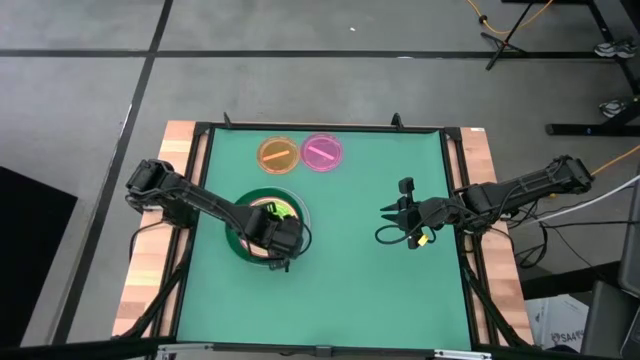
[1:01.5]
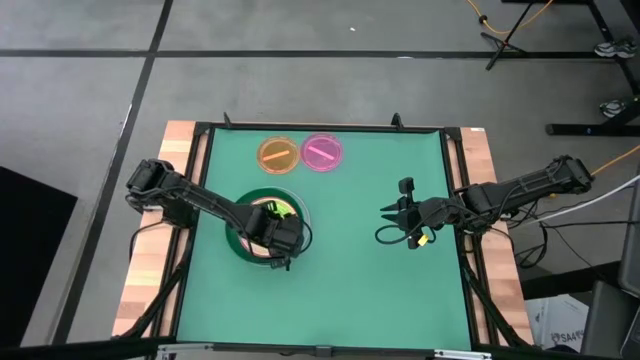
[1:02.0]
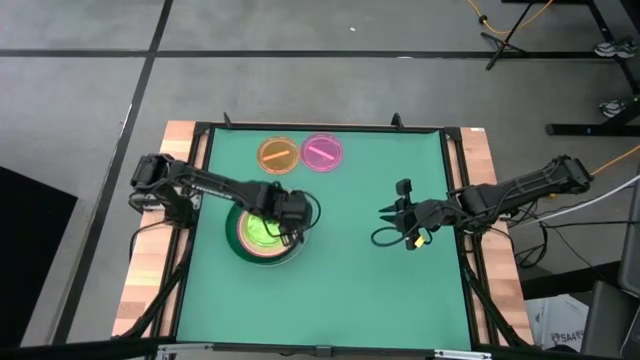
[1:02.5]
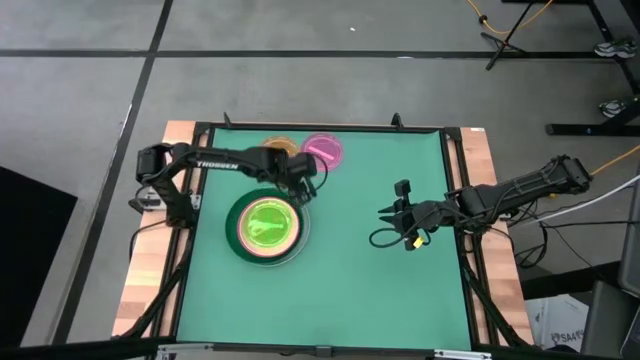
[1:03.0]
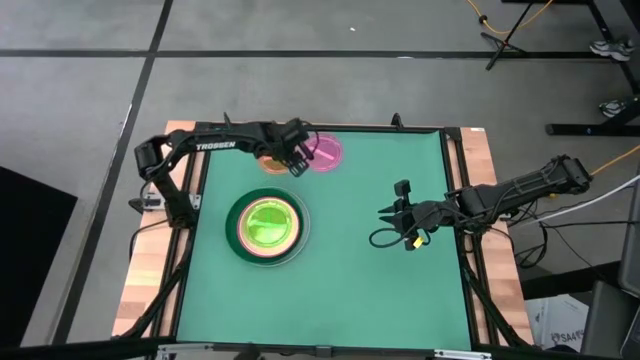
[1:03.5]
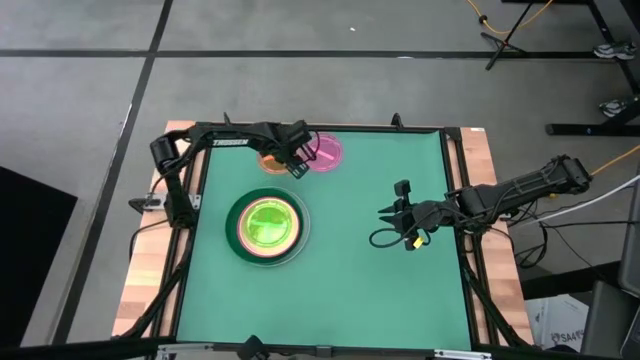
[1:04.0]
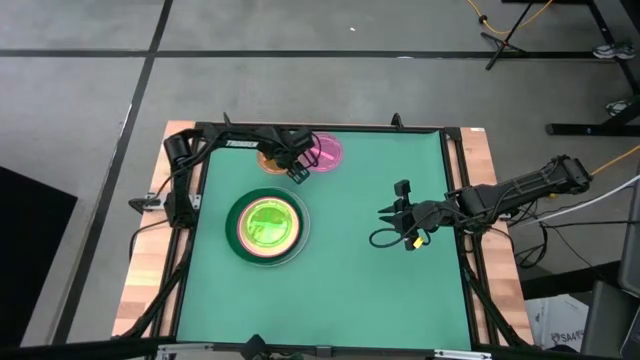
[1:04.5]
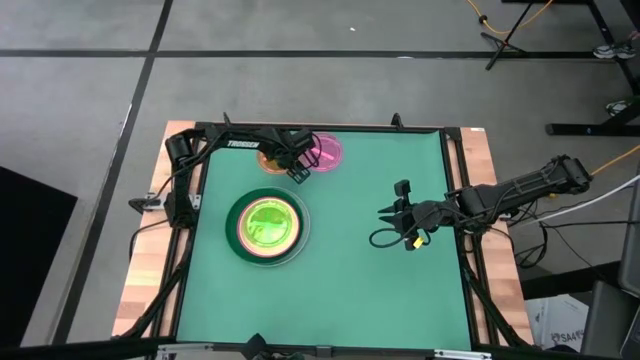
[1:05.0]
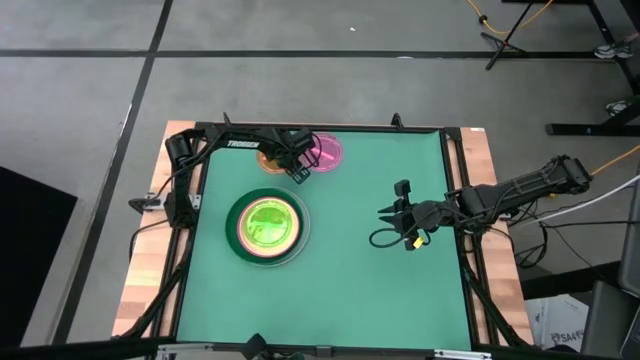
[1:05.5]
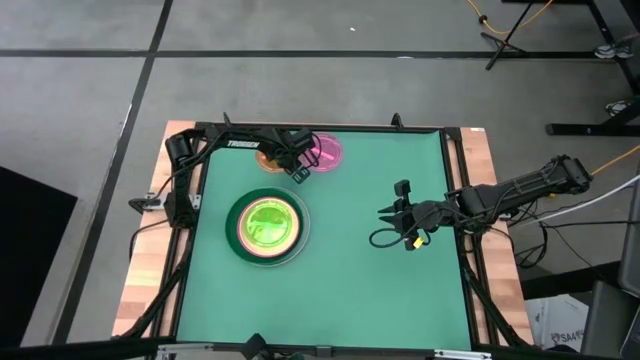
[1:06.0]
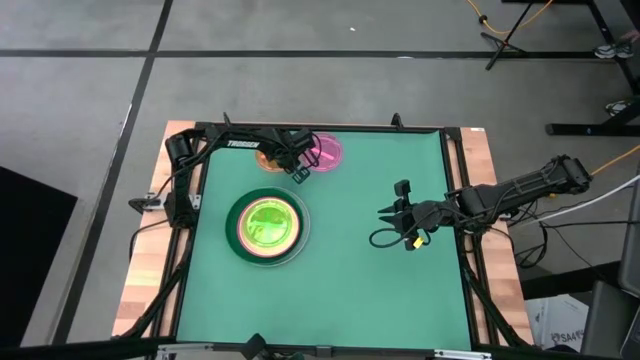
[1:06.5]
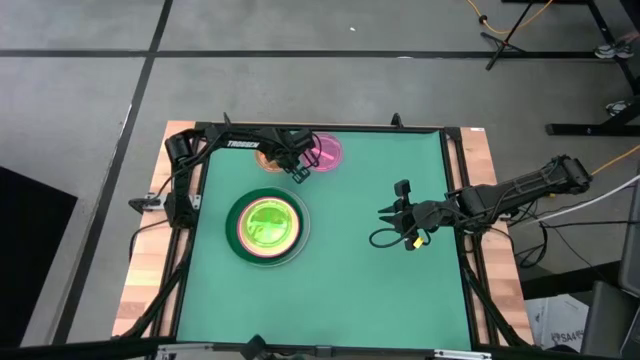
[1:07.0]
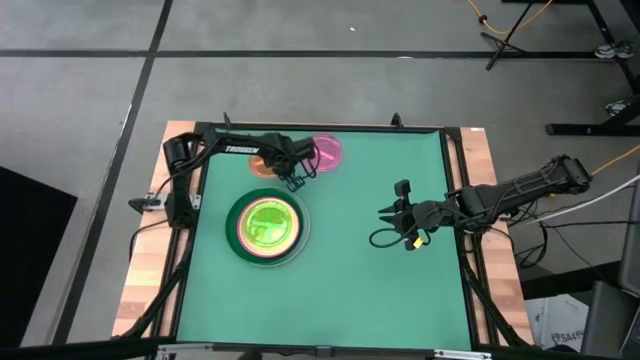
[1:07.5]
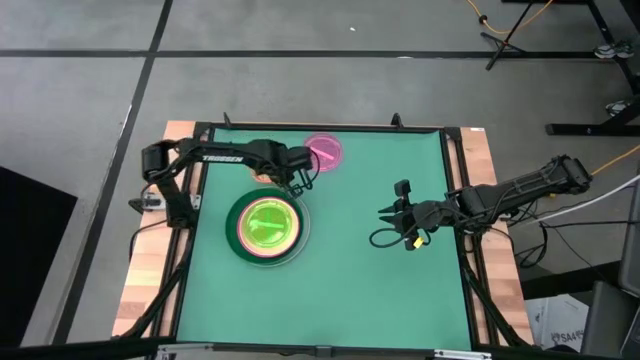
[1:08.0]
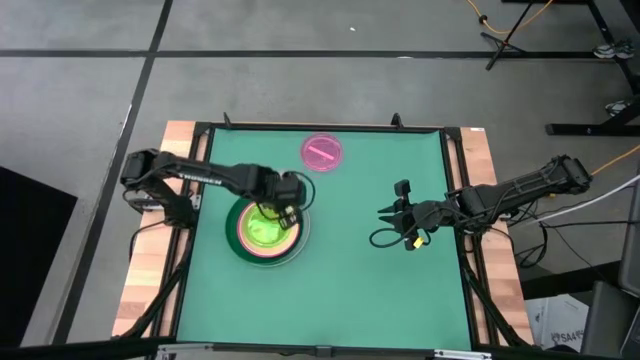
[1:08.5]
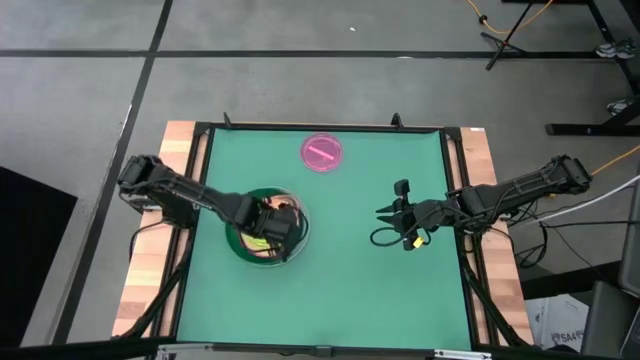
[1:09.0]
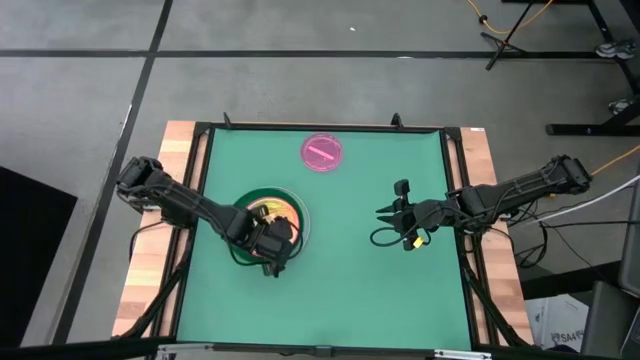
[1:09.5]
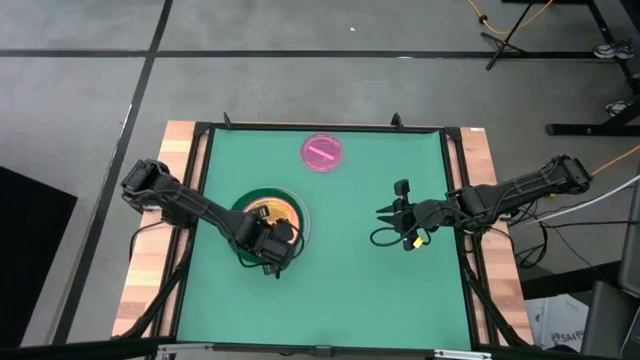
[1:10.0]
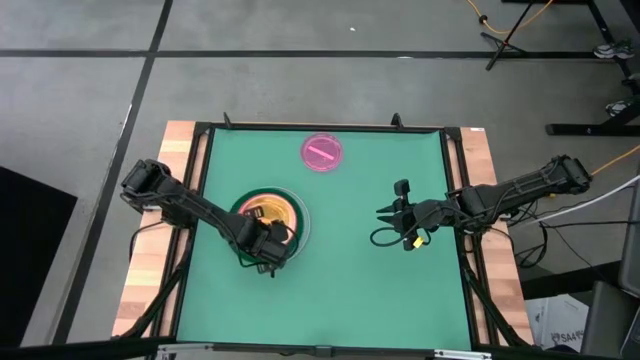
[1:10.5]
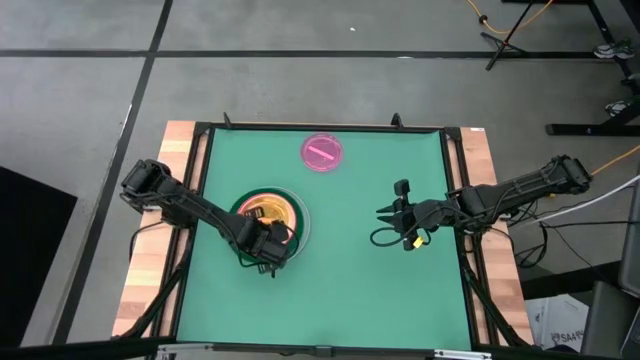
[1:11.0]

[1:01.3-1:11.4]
Task: Stack plastic plates
Stack the transparent orange plate on top of the the transparent green plate

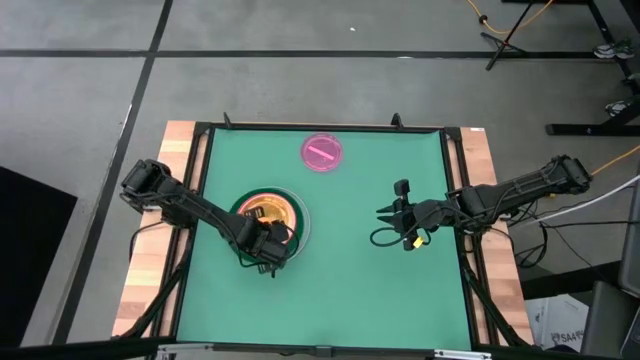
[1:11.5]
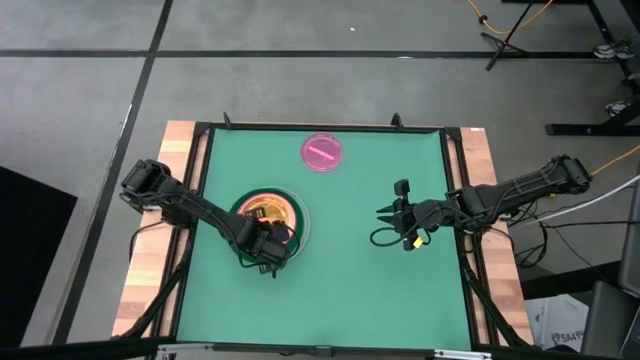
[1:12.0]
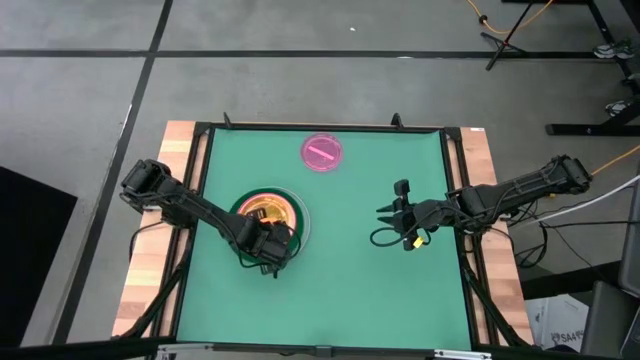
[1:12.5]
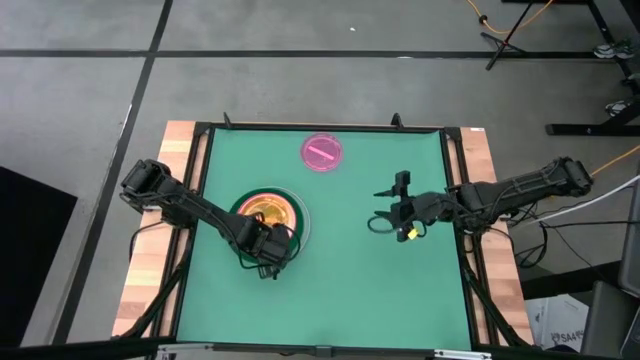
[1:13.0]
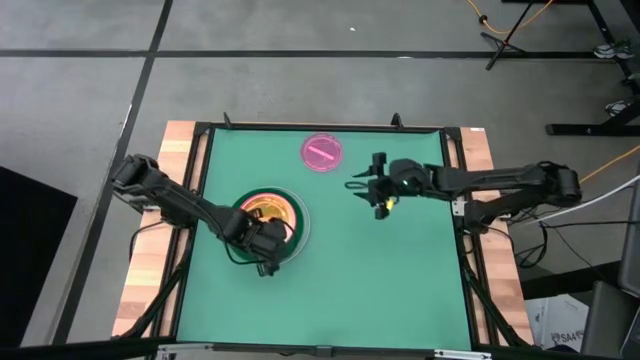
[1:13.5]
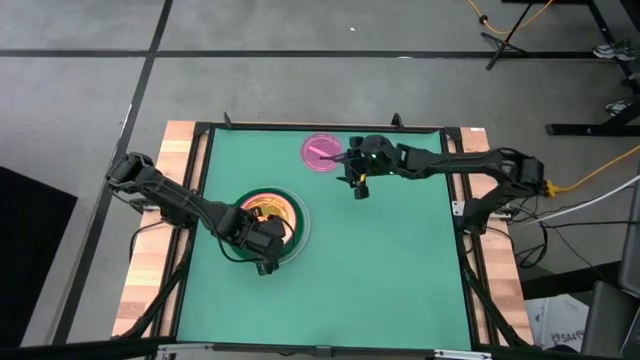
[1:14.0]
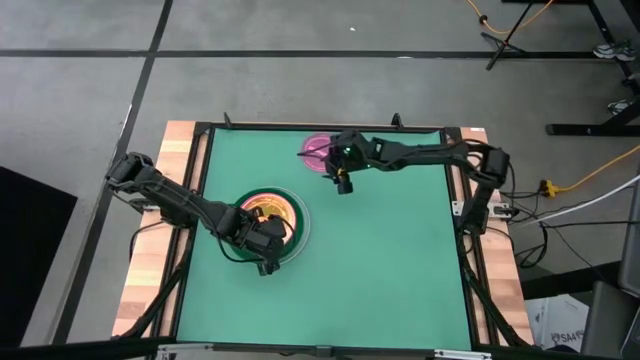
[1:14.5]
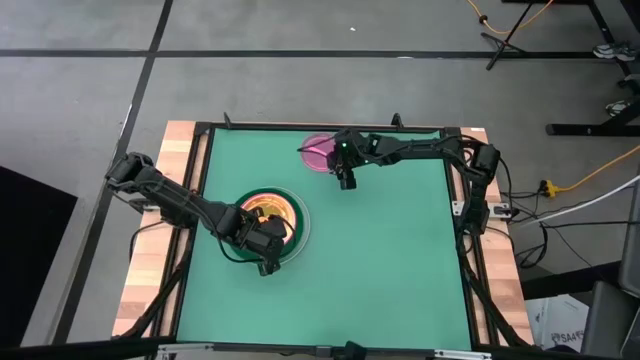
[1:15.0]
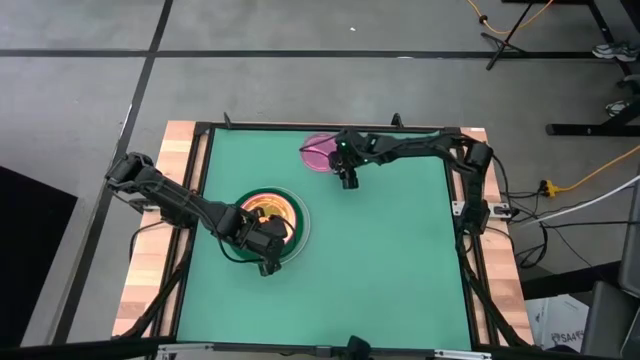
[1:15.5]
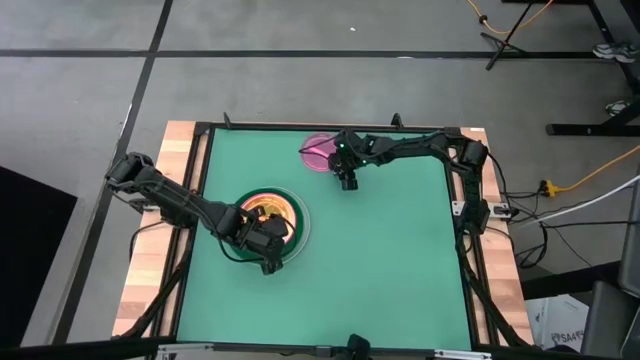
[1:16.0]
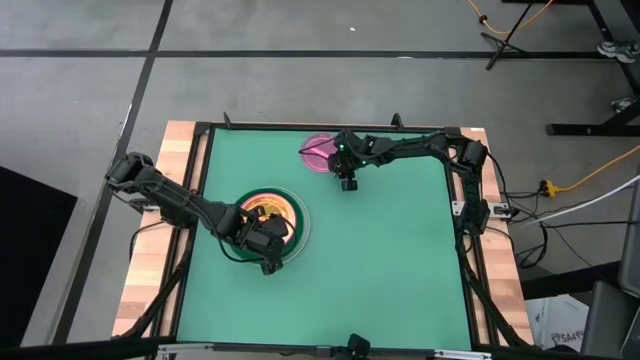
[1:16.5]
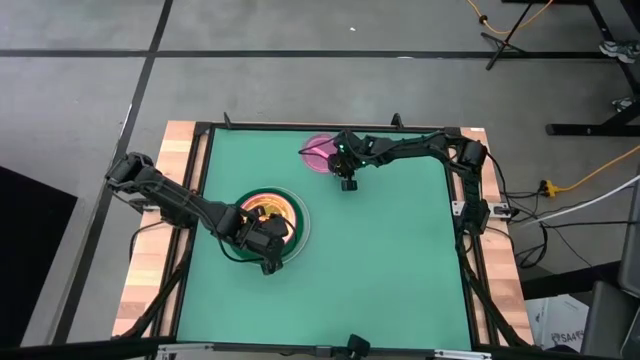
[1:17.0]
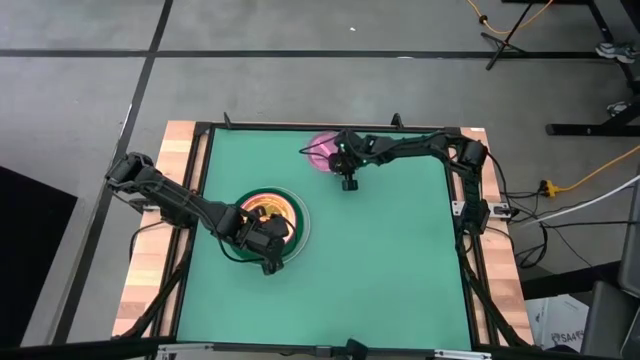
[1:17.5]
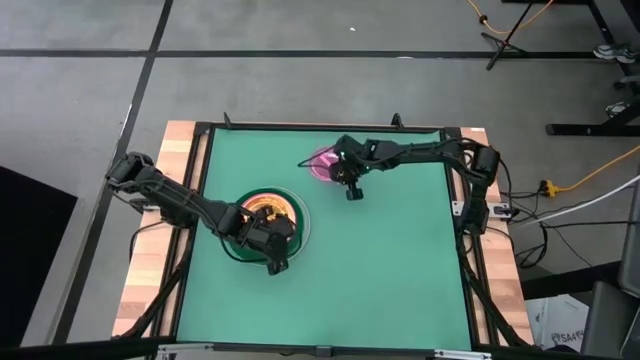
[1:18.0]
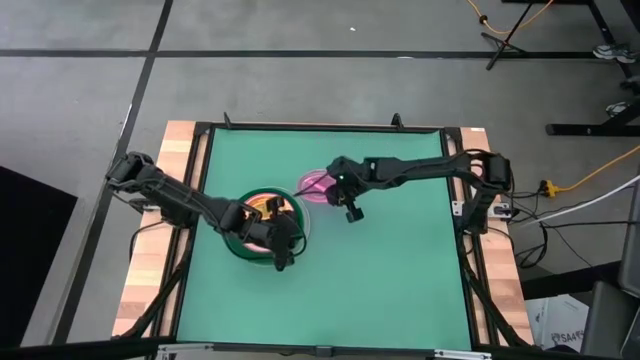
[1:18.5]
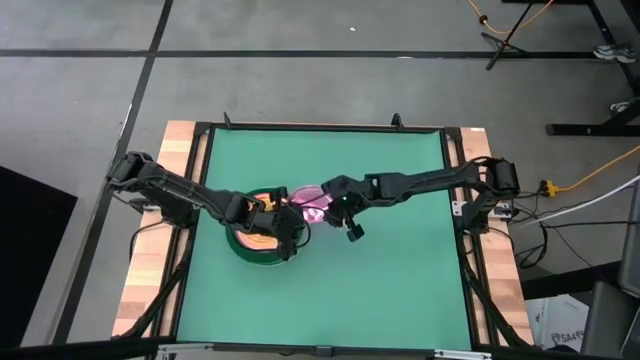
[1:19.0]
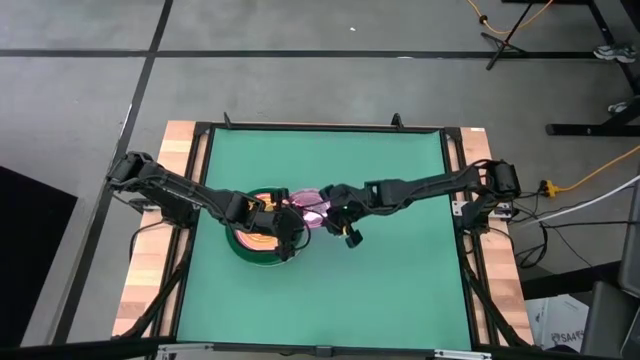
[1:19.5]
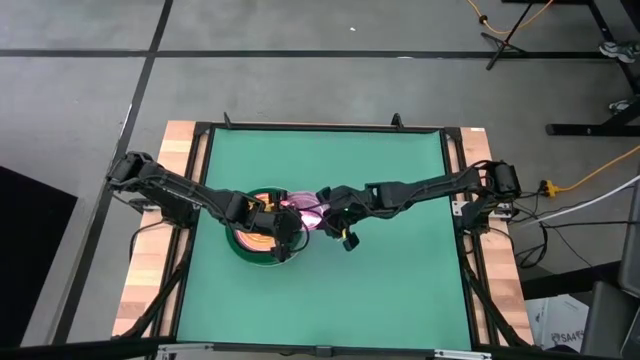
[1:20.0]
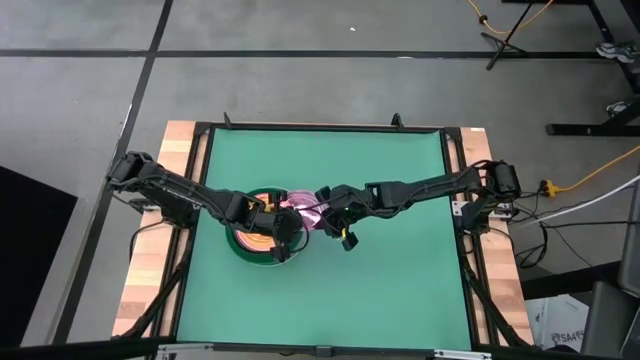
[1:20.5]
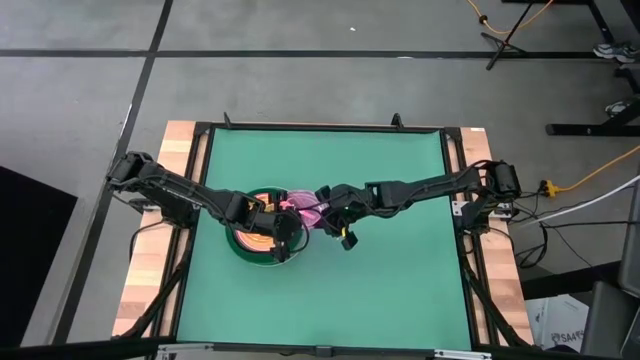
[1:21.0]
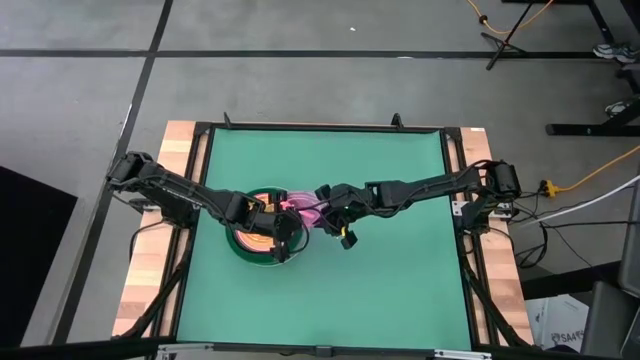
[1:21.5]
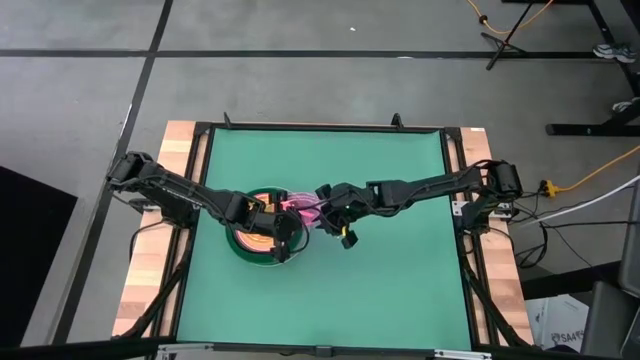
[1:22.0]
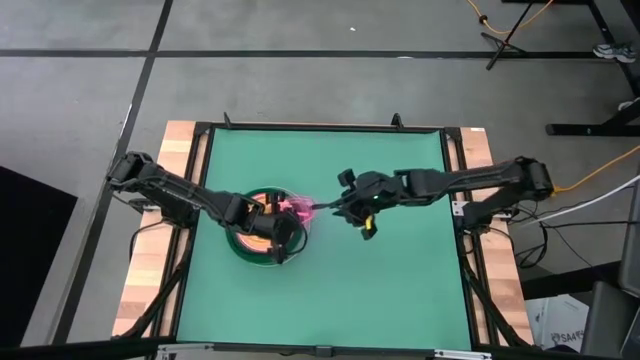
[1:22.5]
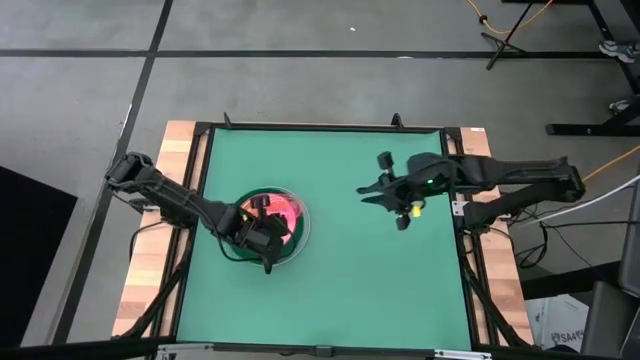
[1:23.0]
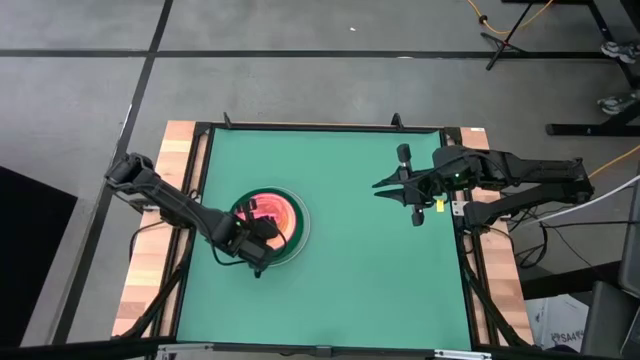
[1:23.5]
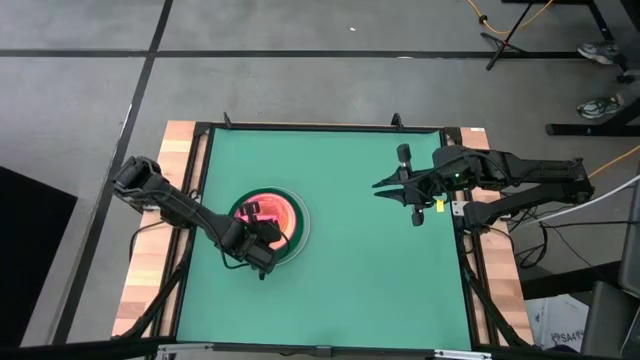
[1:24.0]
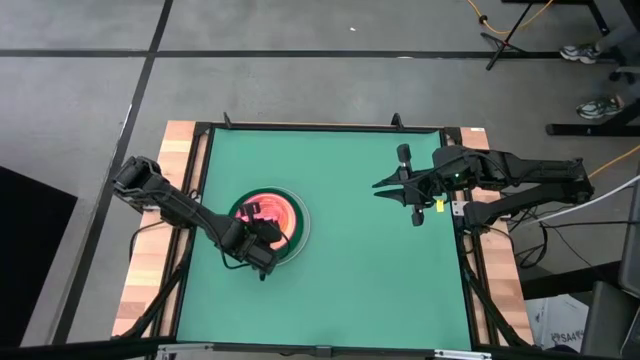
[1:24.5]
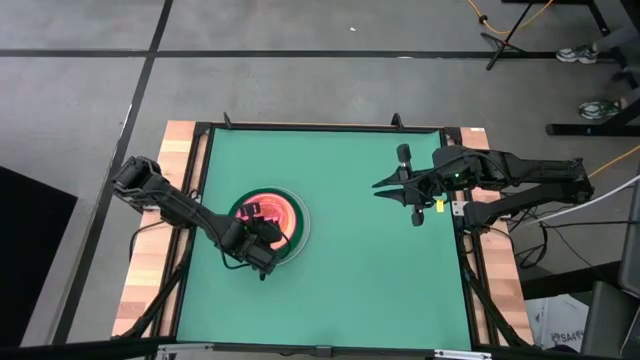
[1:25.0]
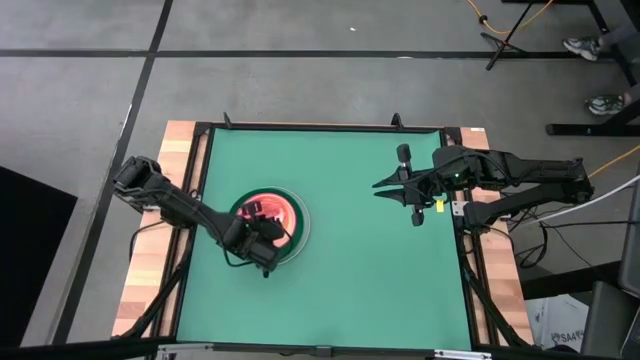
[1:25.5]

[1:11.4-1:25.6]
Stack the transparent pink plate on top of the the transparent orange plate
